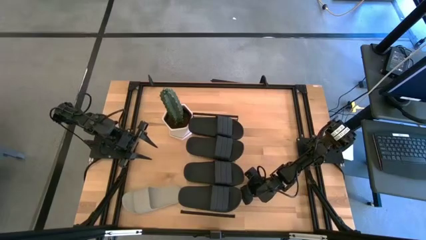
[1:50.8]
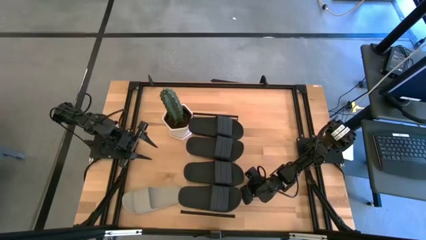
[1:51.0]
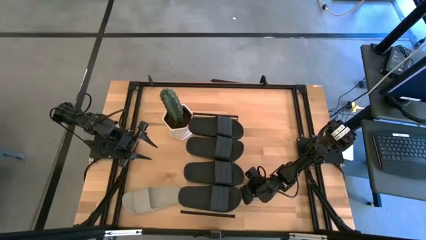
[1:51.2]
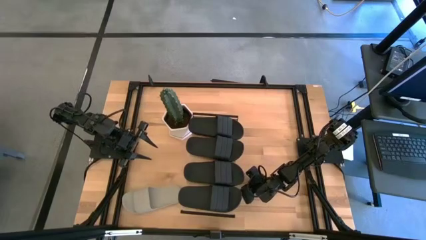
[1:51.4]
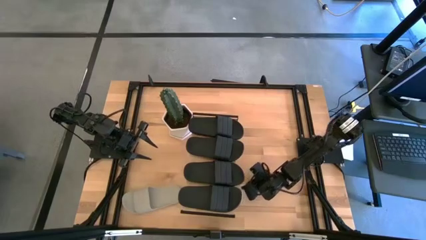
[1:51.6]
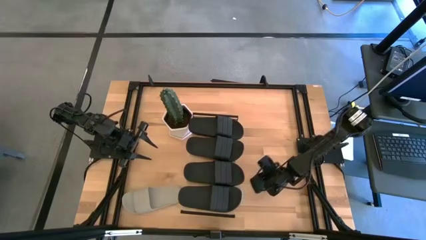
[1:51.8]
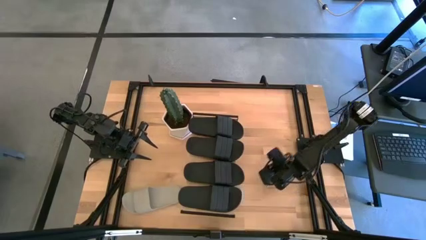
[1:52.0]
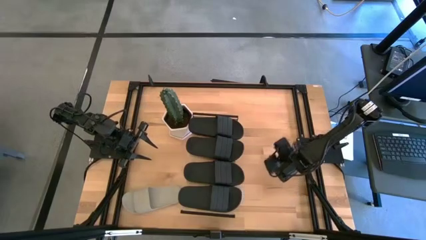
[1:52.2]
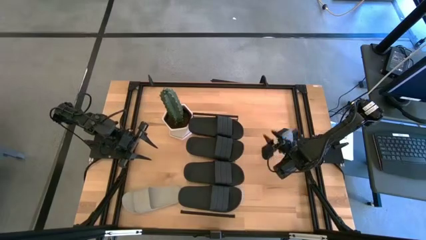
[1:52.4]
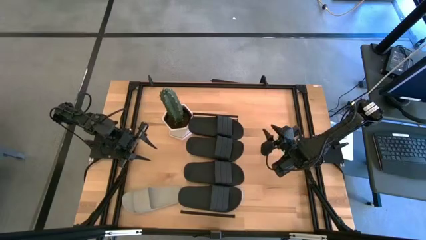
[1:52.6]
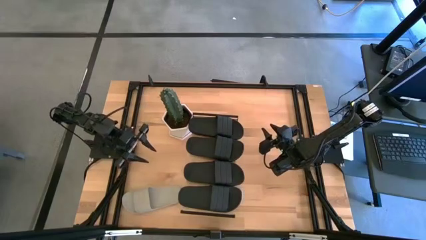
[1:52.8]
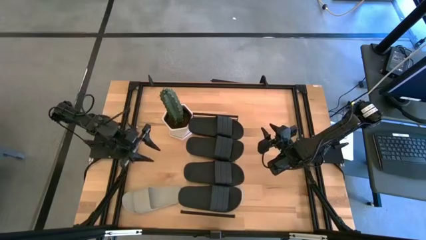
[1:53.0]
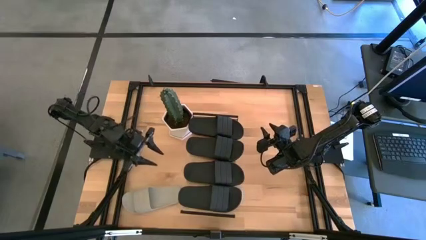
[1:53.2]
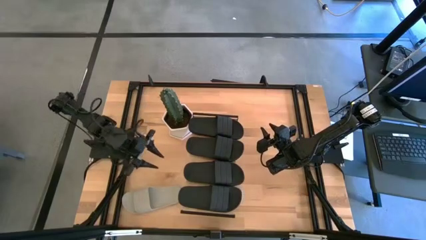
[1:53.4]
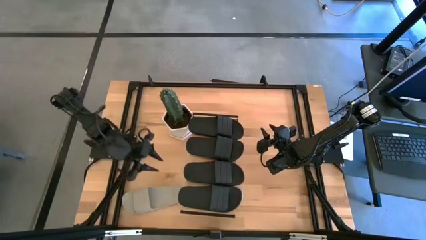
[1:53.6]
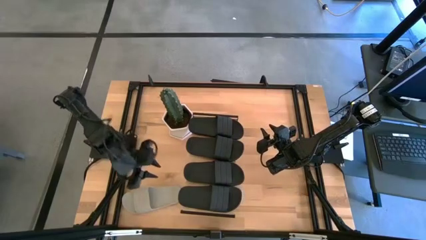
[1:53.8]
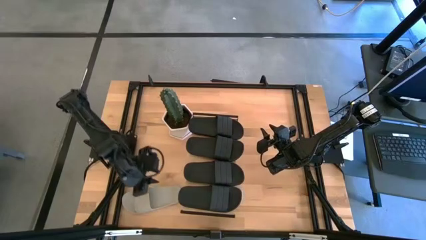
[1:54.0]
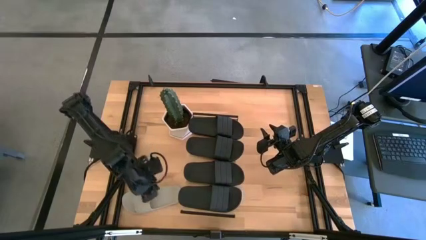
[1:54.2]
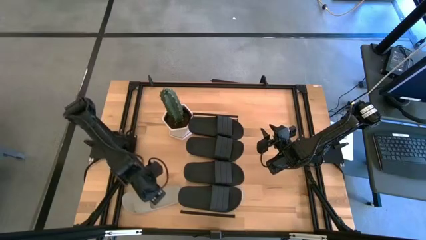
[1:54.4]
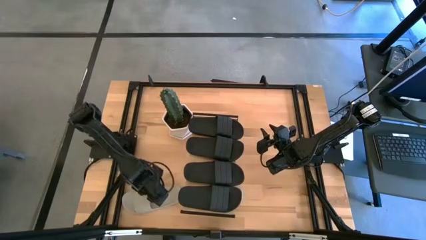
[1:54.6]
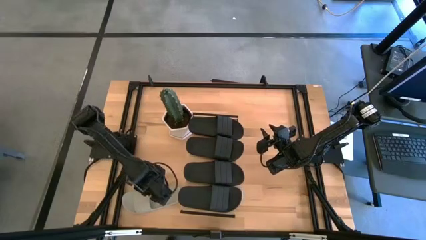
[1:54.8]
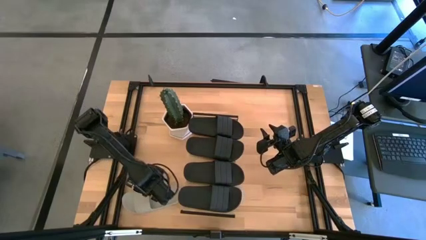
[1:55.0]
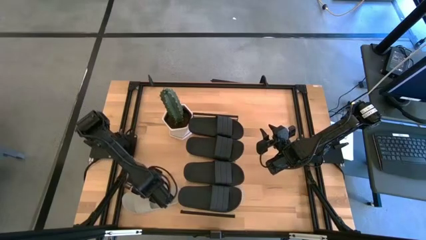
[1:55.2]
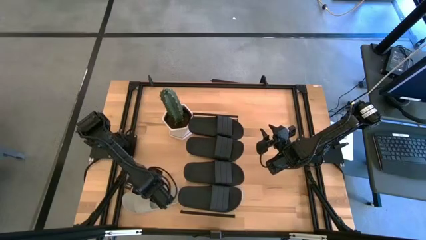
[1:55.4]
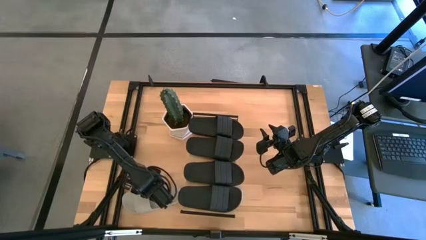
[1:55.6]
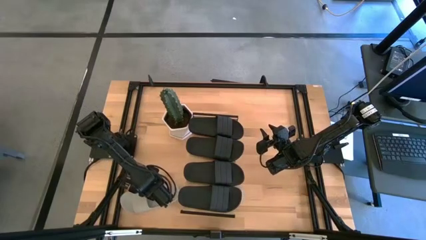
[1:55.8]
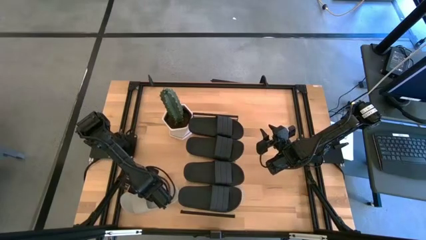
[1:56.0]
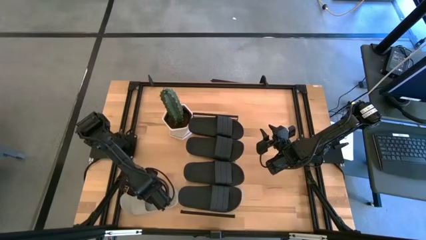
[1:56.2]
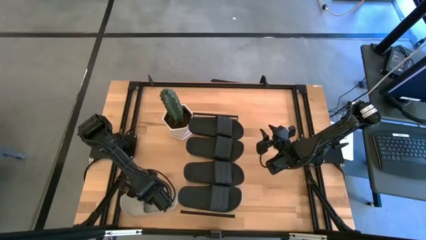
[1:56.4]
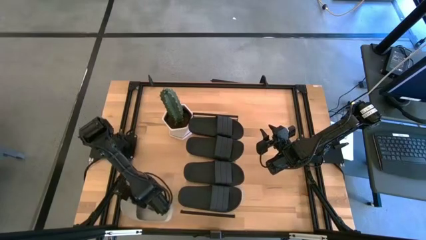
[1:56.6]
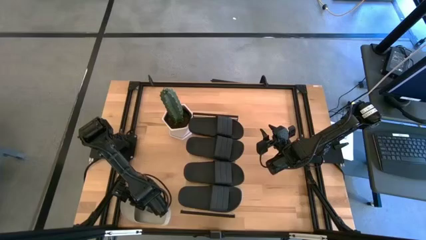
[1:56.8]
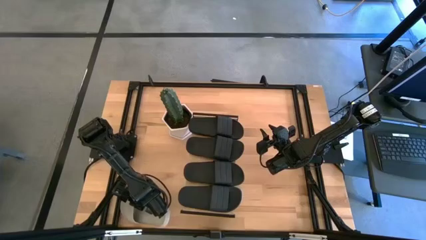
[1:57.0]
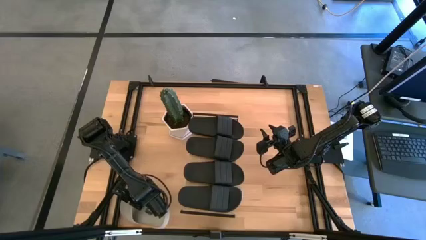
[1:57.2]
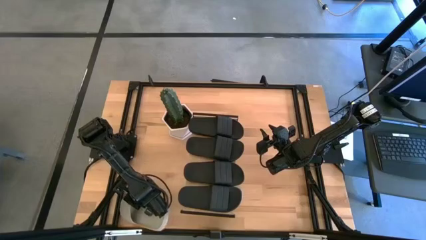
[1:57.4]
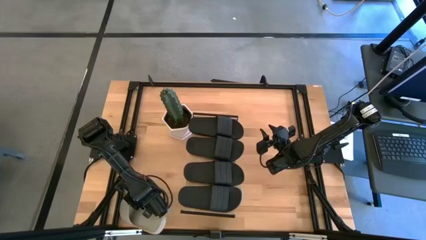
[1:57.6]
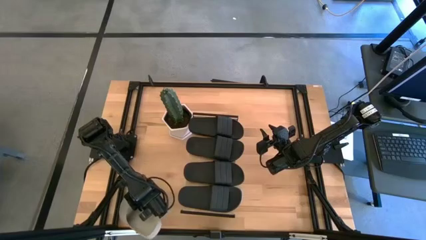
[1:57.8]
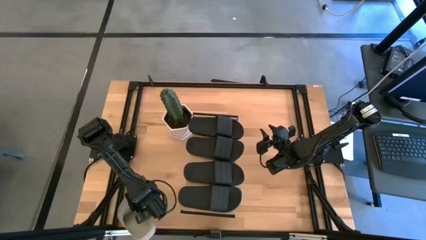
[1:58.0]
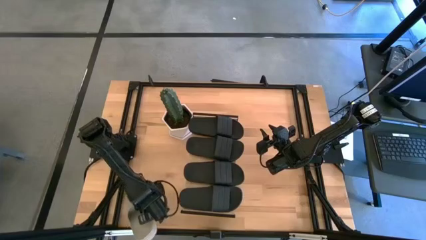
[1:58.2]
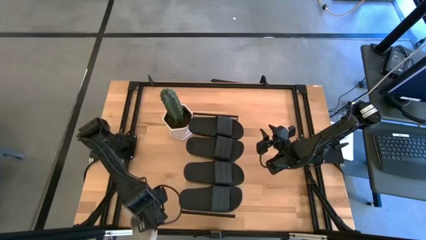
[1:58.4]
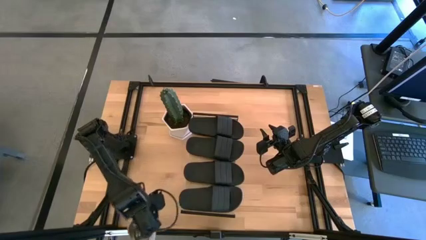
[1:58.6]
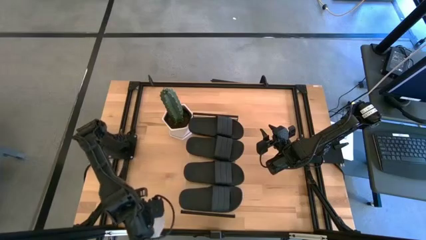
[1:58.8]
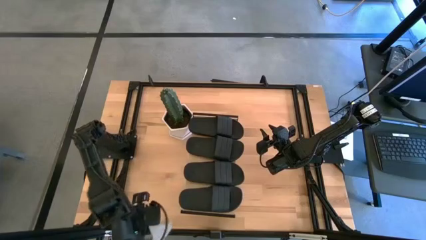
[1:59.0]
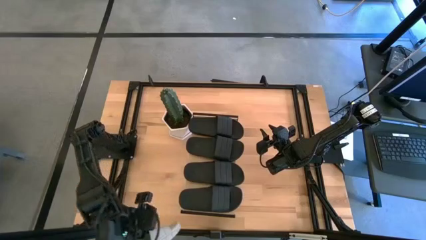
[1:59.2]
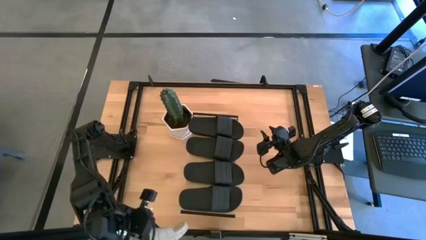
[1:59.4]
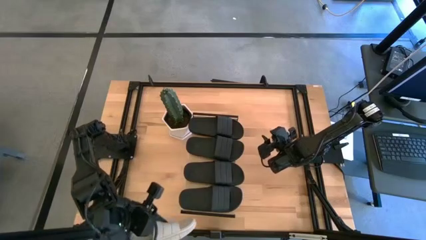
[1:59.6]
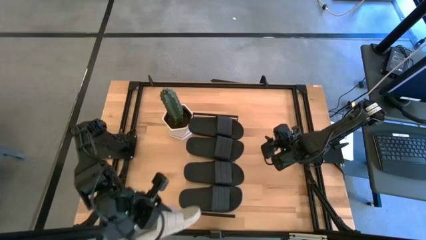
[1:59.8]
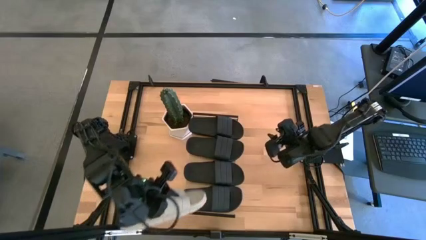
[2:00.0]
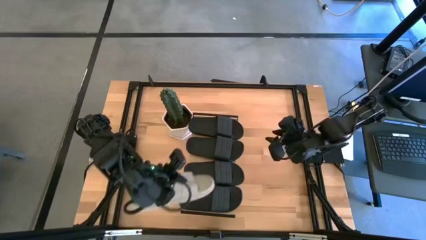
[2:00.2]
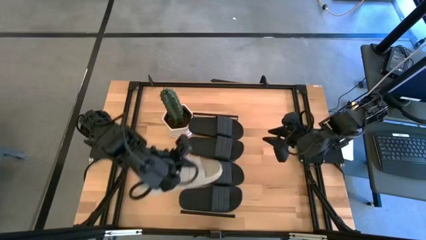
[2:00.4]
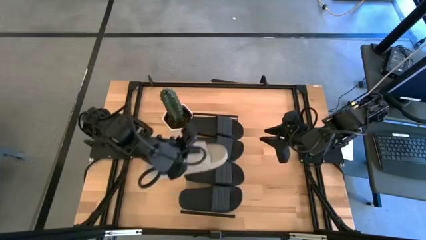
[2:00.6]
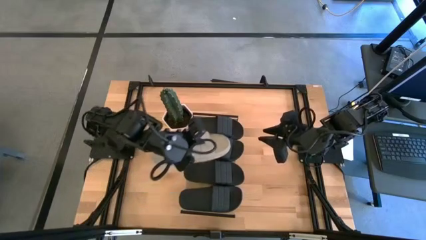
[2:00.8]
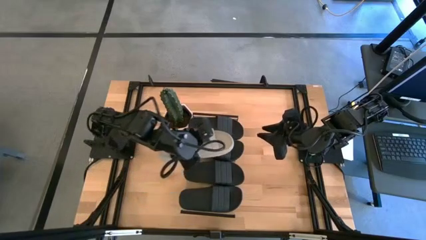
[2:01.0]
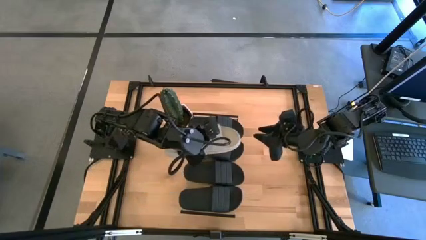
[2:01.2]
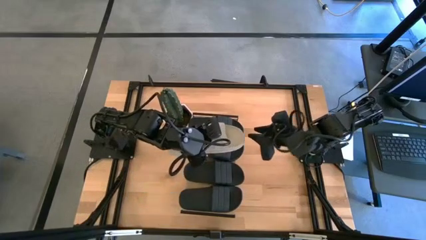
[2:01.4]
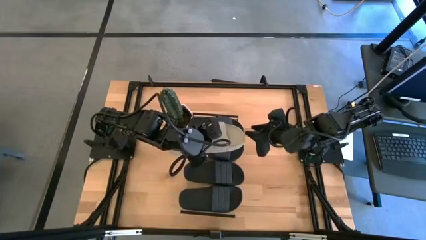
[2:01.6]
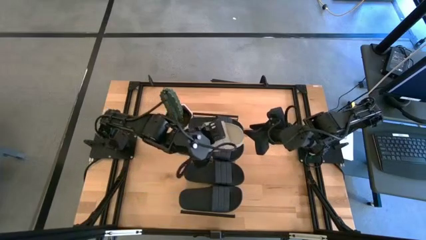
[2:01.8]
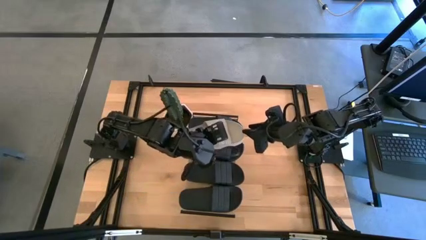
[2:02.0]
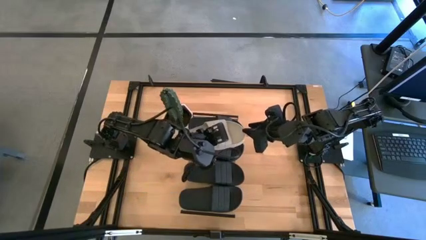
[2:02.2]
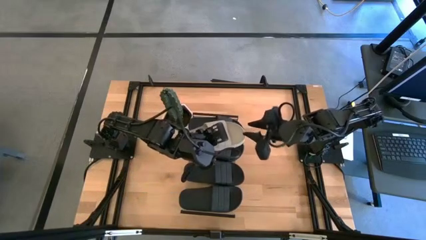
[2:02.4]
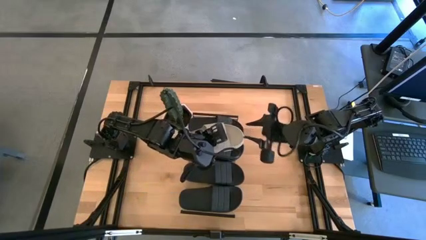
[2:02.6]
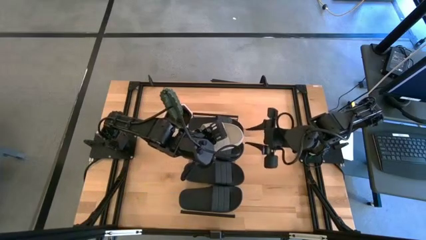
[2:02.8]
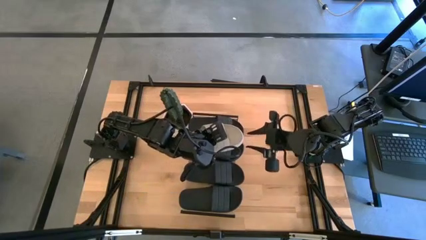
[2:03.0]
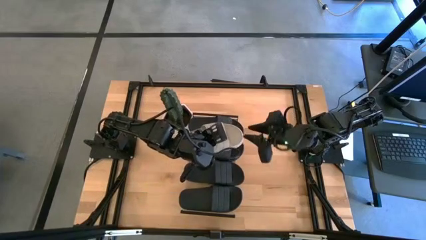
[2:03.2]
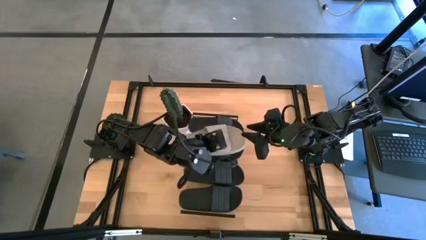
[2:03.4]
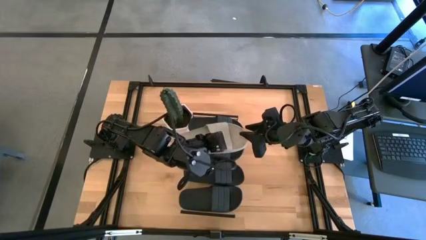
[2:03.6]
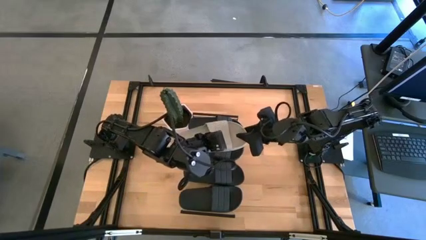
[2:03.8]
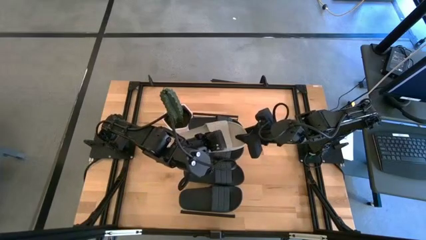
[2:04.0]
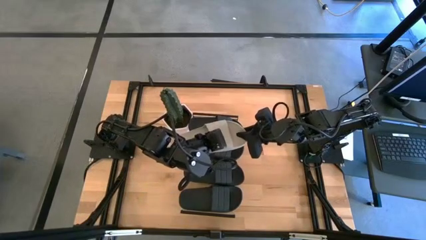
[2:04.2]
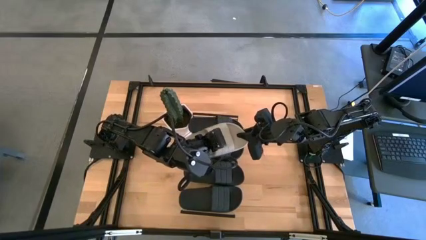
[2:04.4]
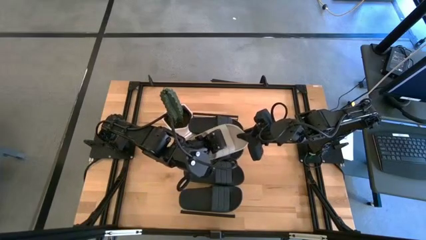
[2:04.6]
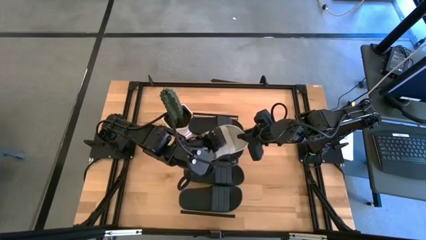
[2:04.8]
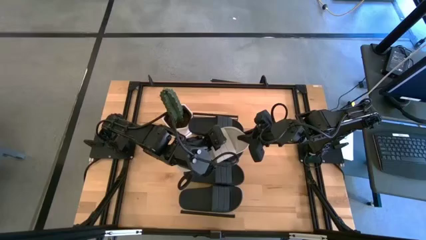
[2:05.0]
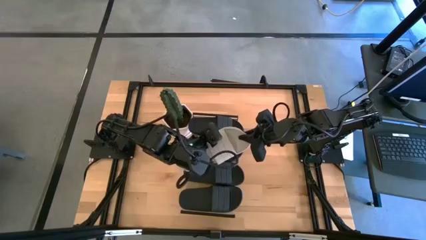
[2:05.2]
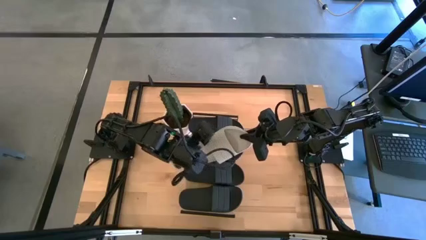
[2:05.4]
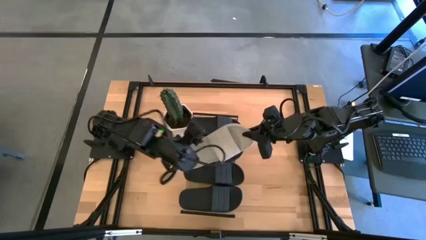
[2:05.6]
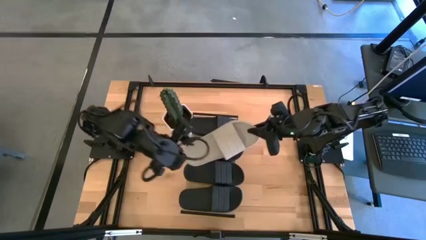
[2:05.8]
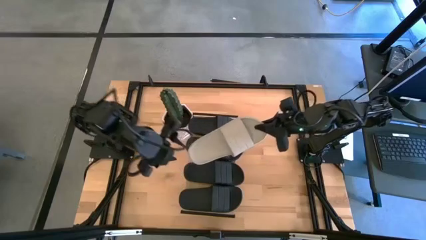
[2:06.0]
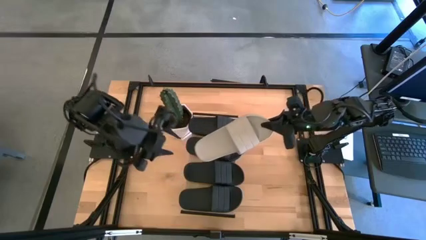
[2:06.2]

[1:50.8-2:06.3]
Task: Pick and place slides into the shelf
Put the gray slide under the shelf
